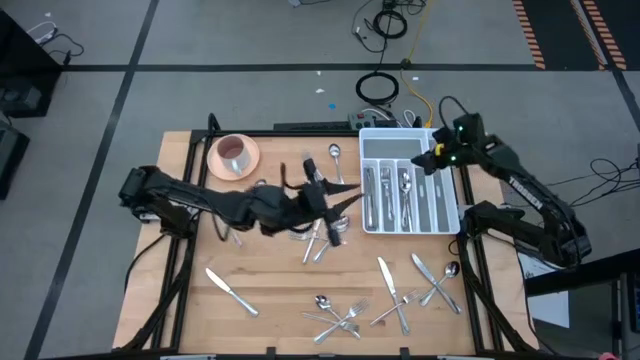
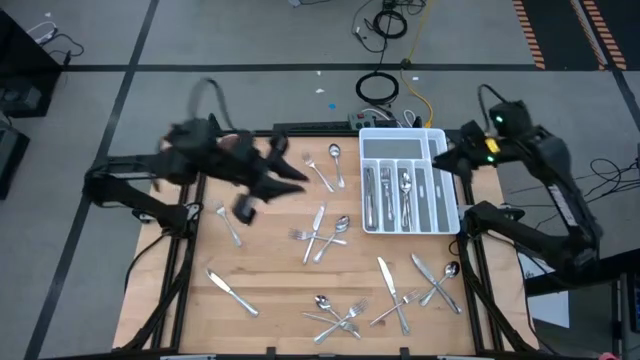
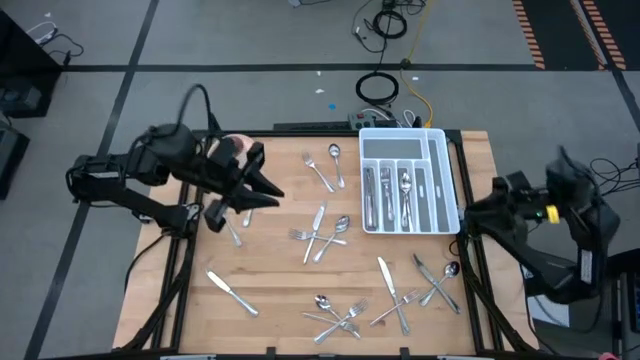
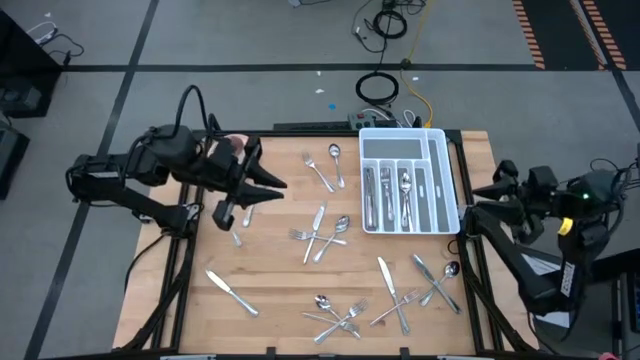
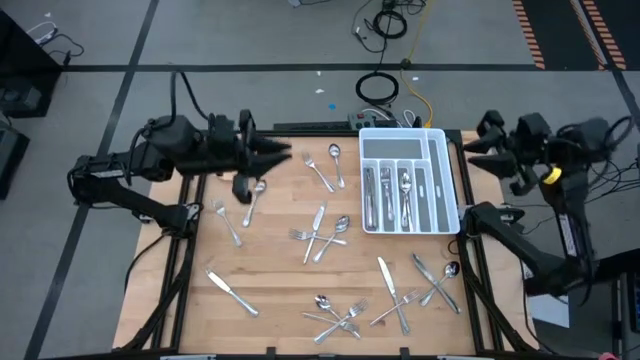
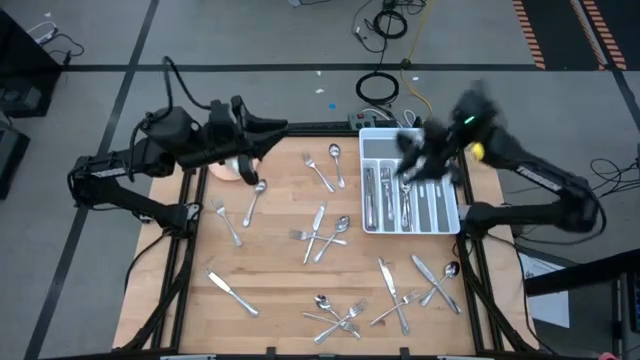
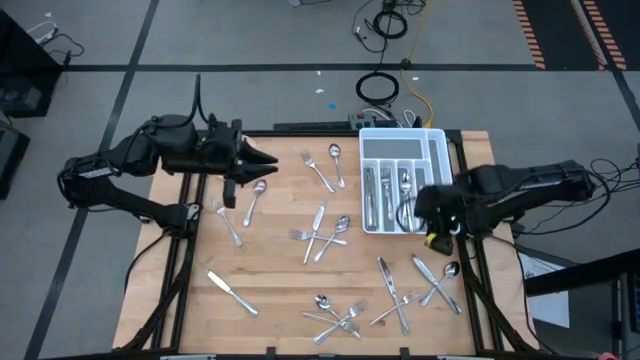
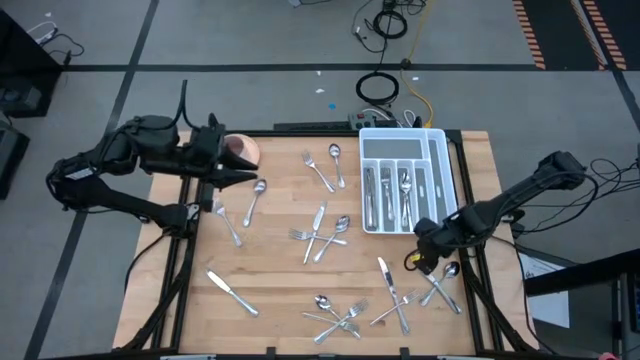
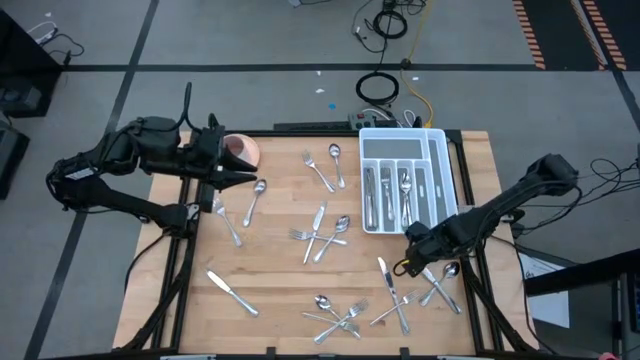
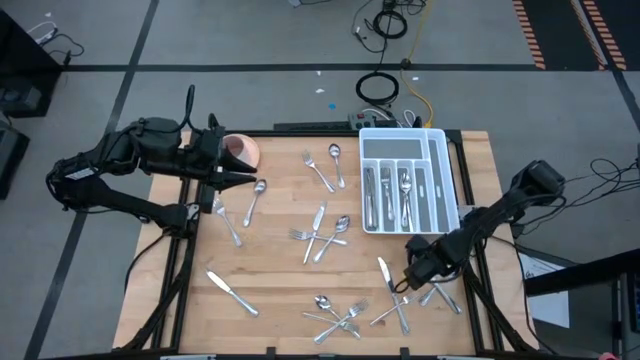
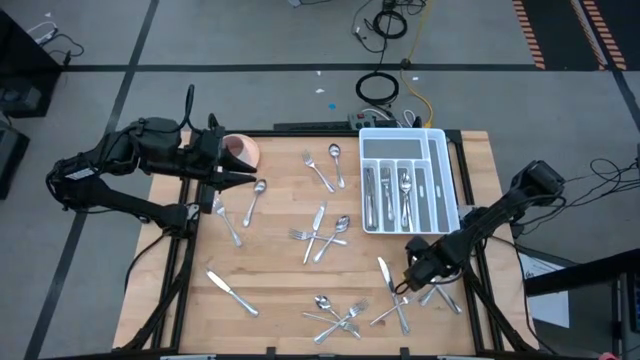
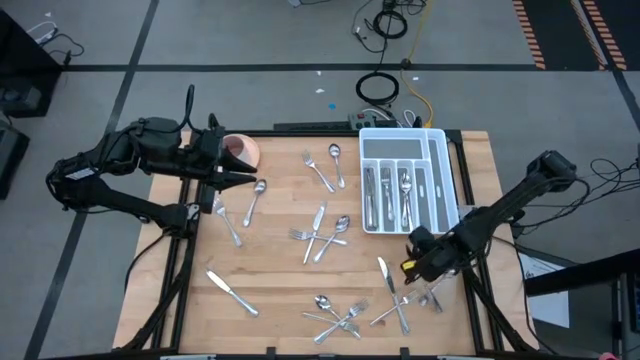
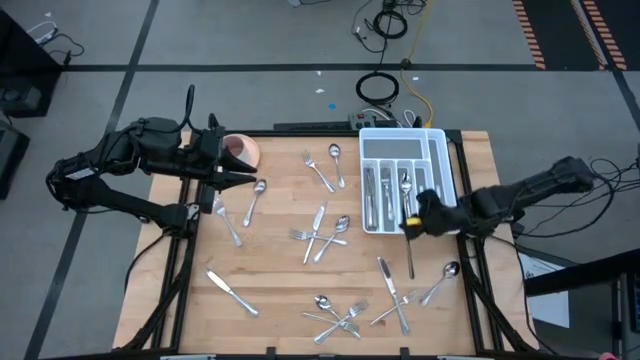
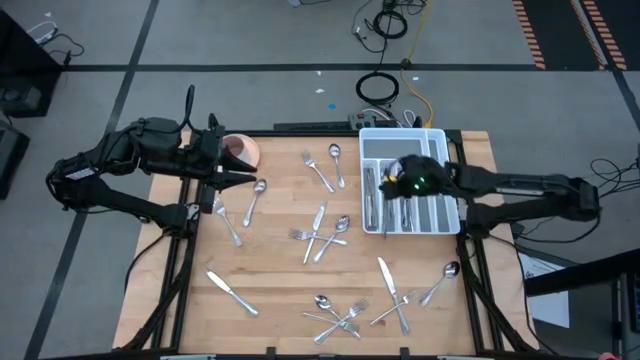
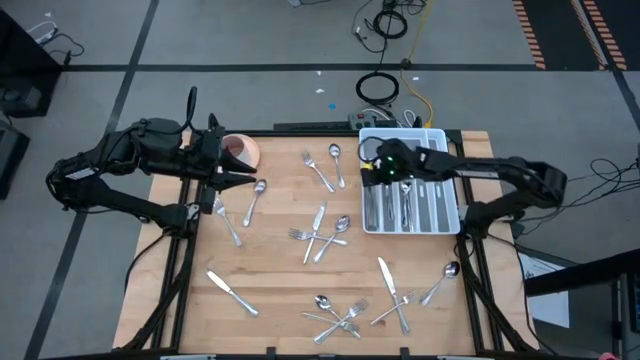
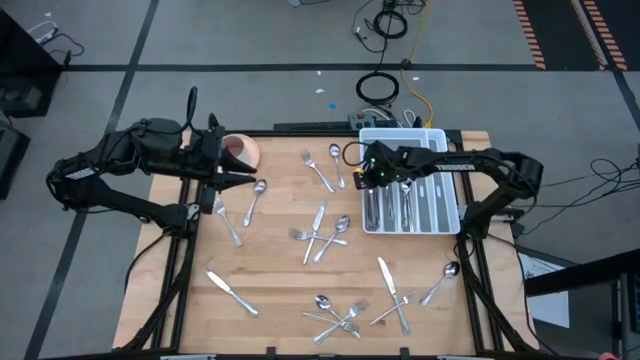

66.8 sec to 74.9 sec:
Task: Sort silverware
Put the silver knife into the white cutlery tray

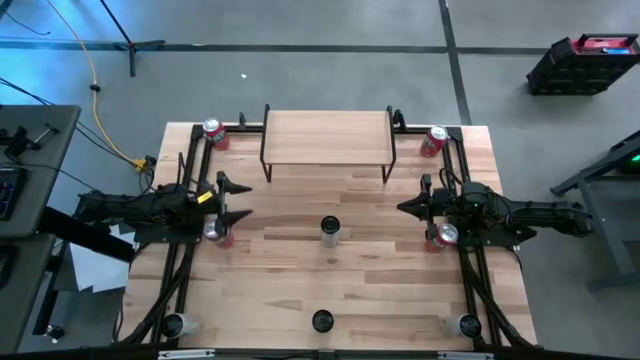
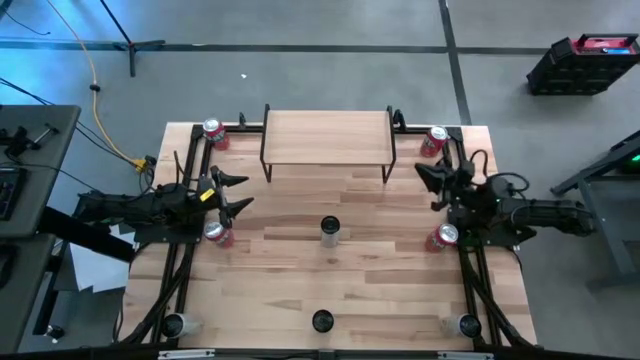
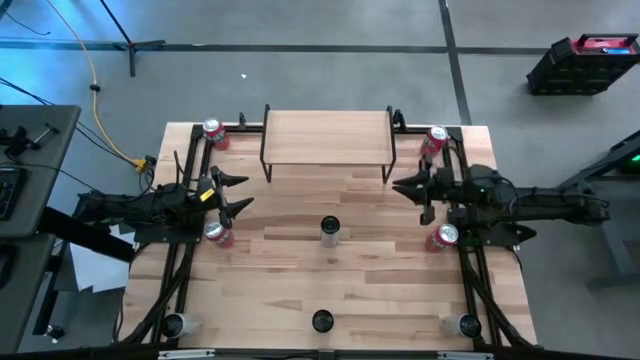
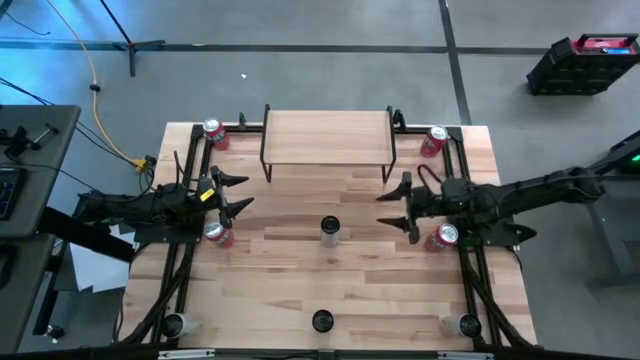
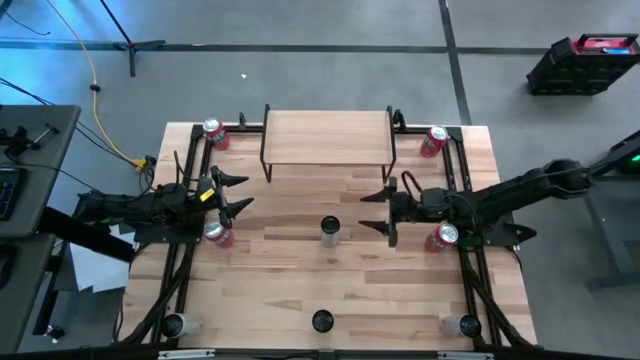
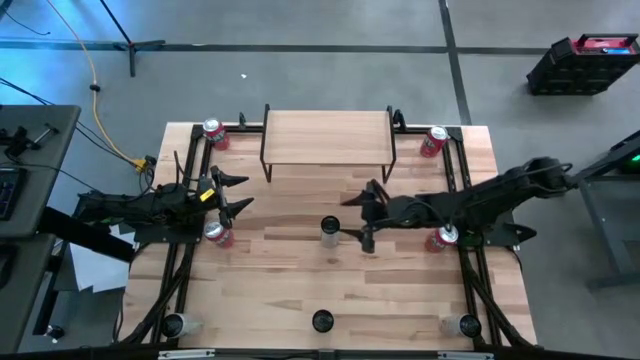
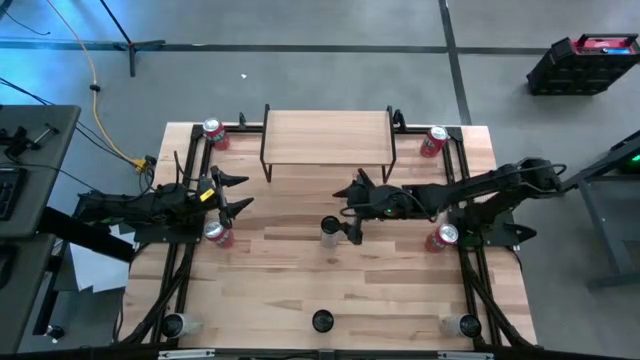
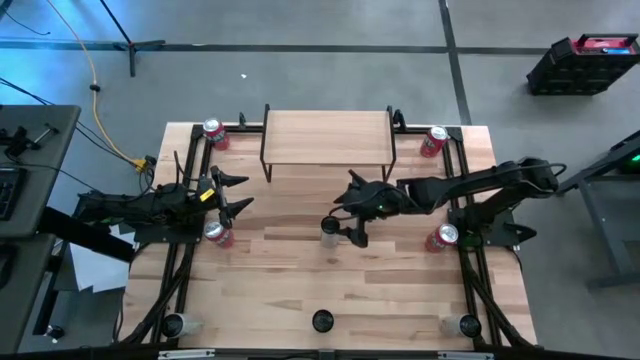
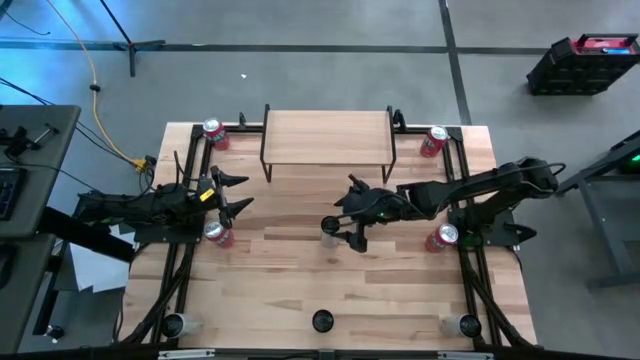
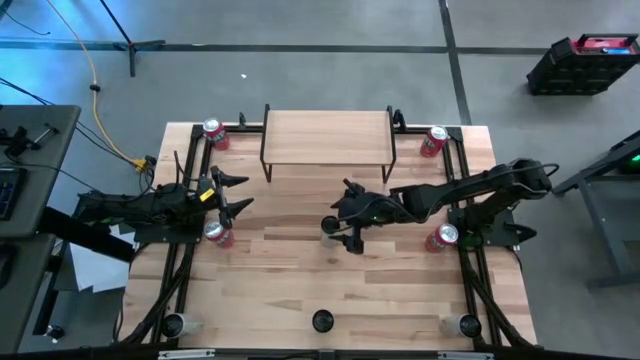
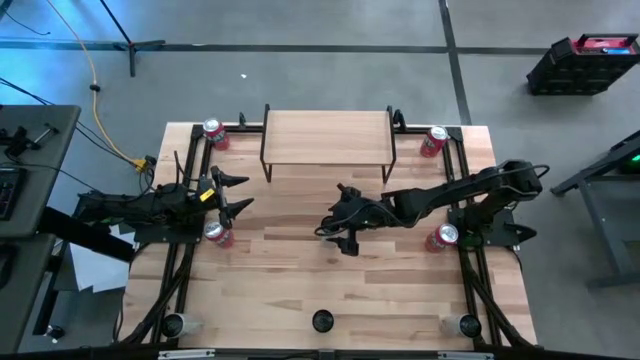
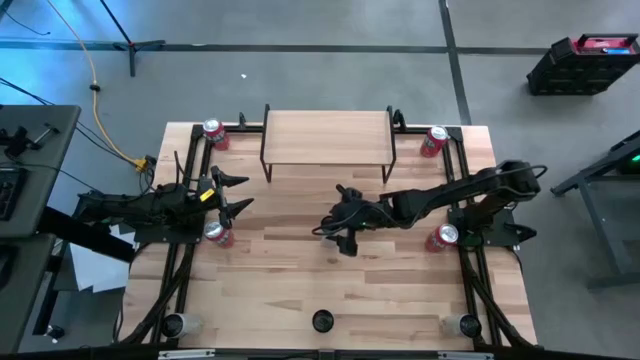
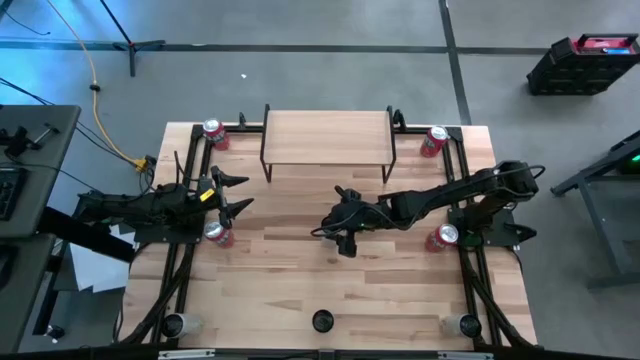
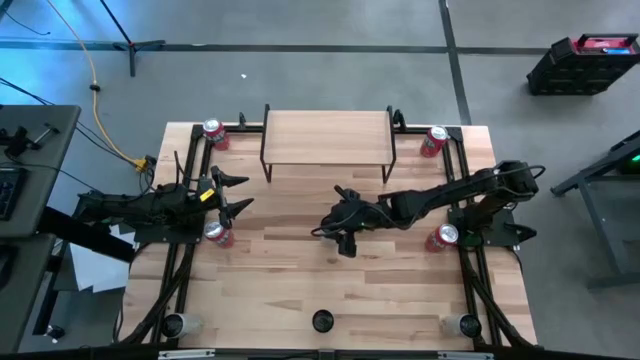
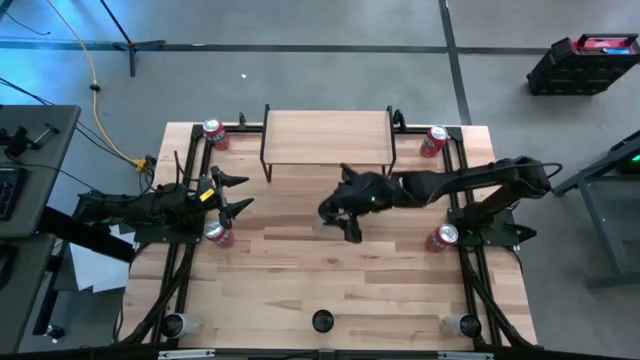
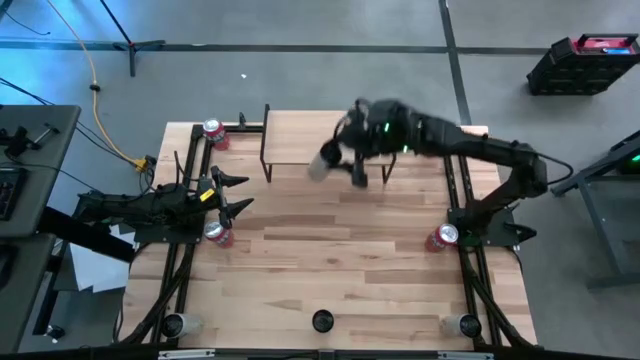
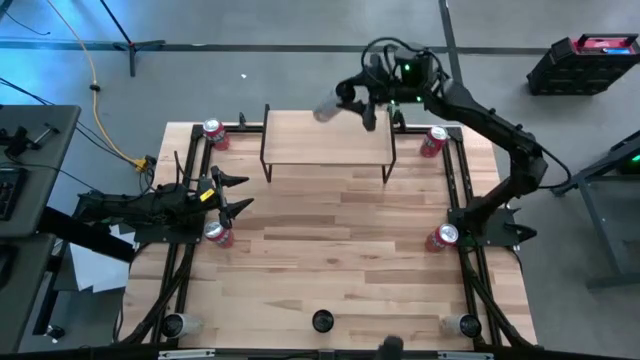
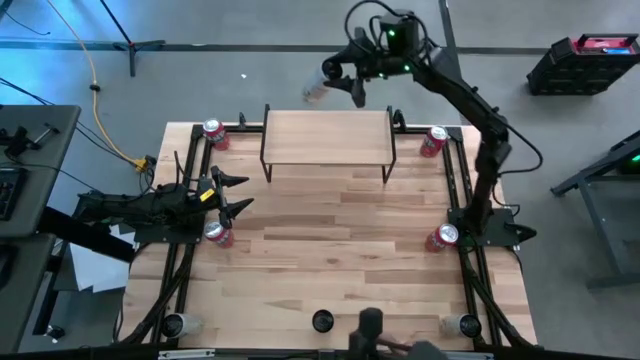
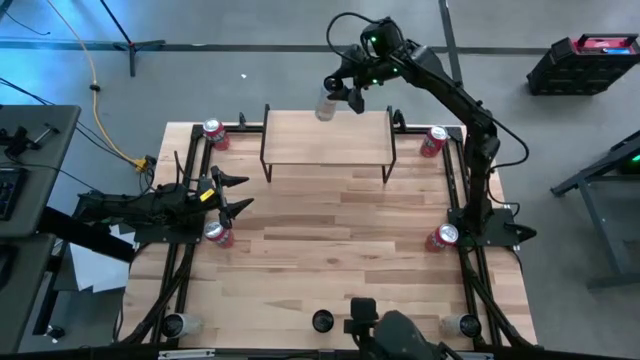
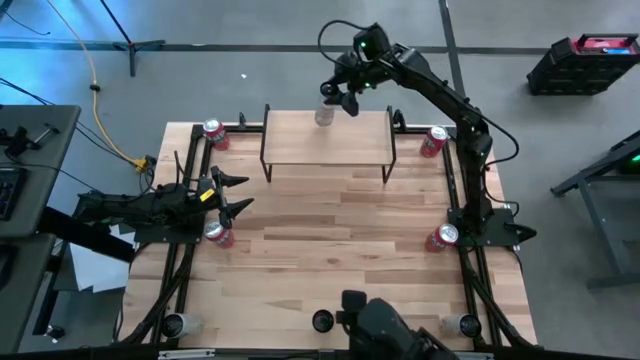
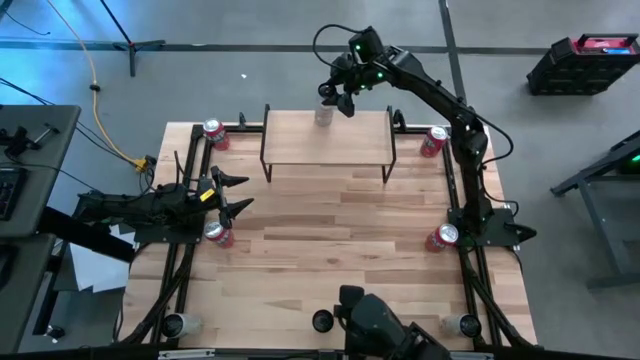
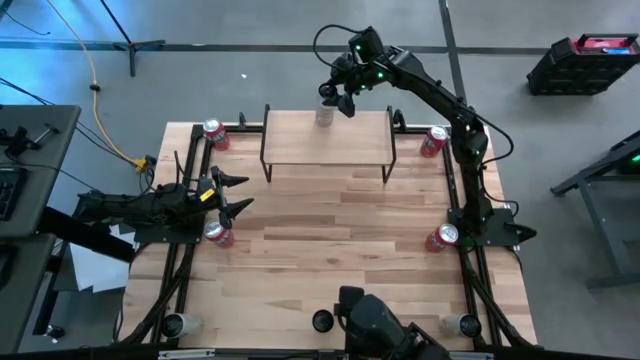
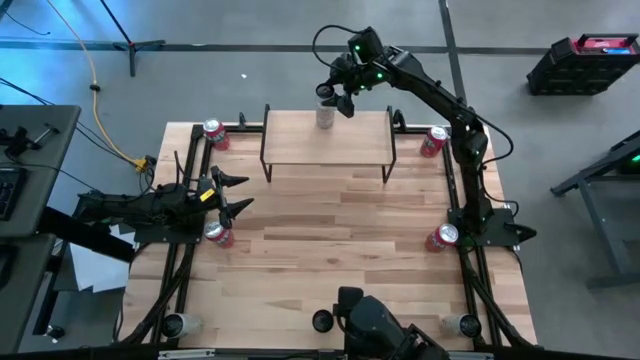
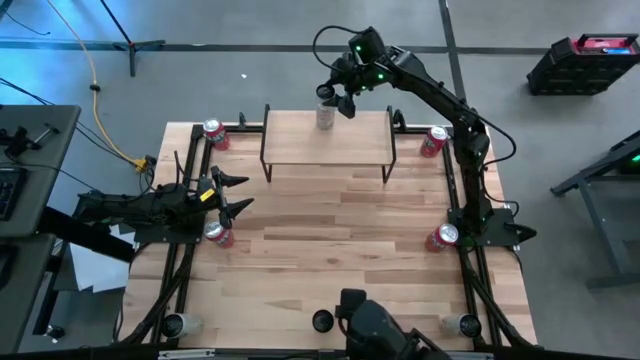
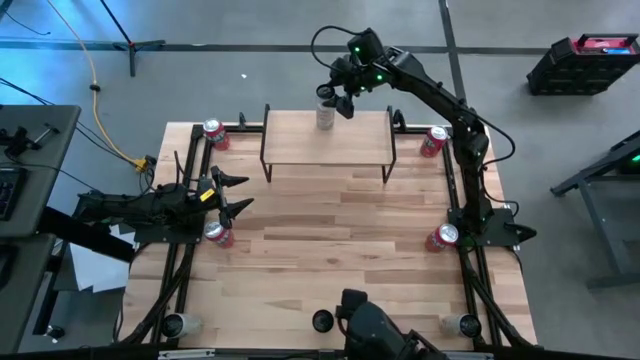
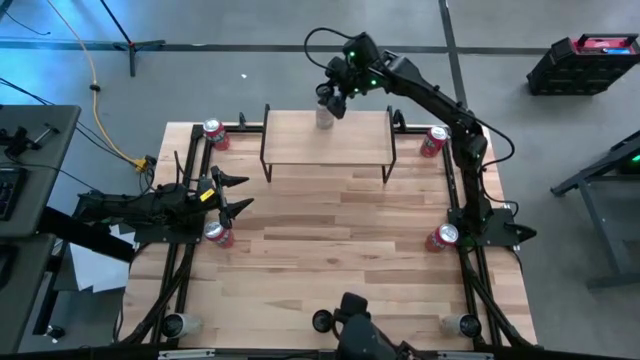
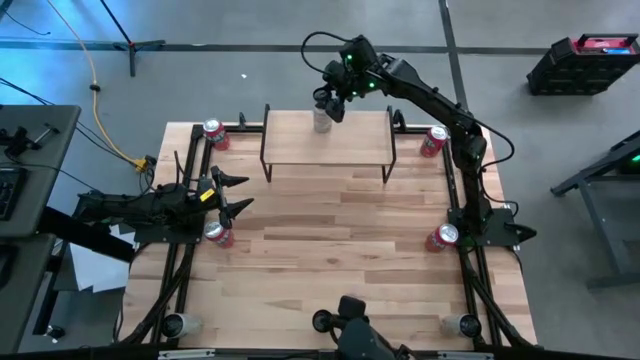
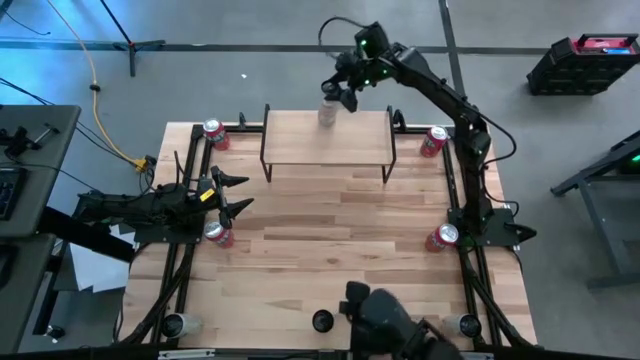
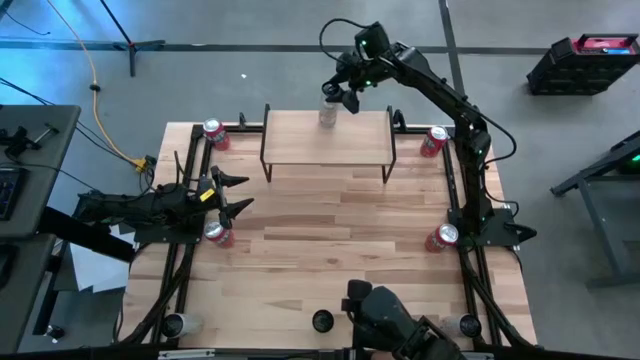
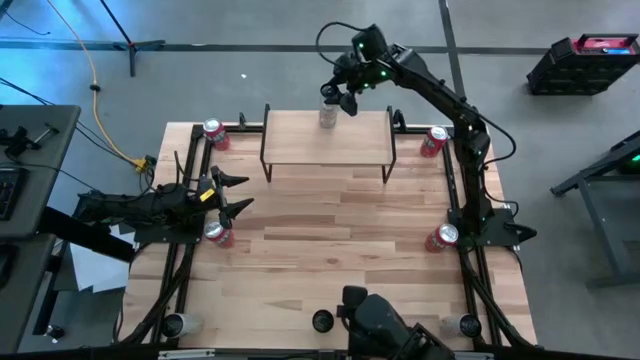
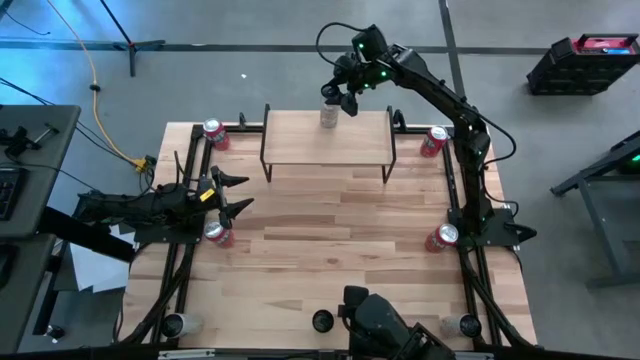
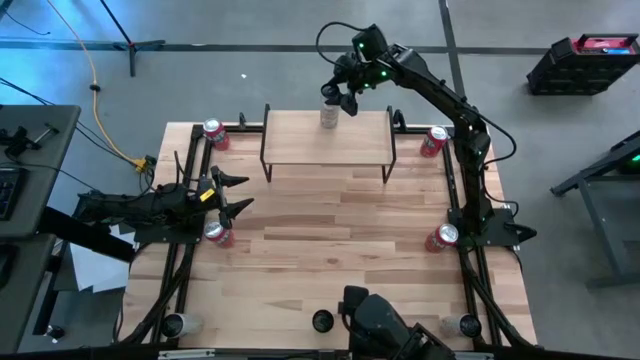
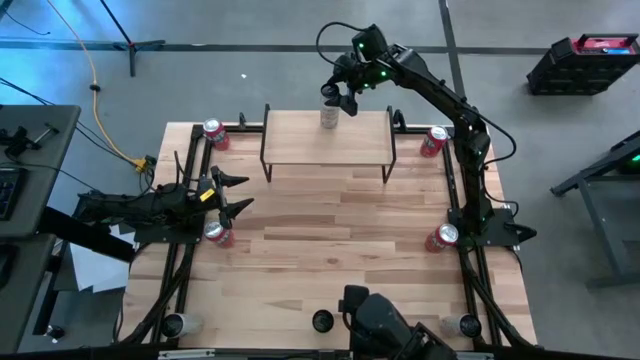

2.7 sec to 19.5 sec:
Task: Place canned beverage on shelf
Put the top white yellow soda can on the shelf
